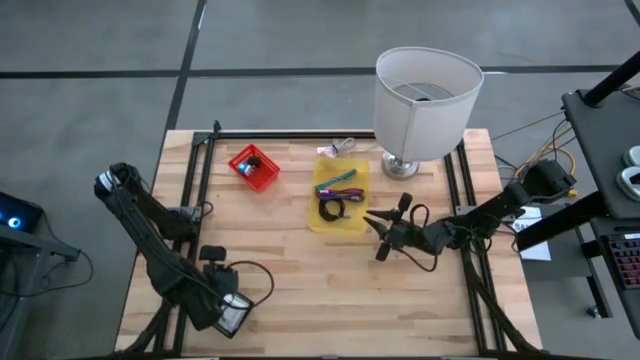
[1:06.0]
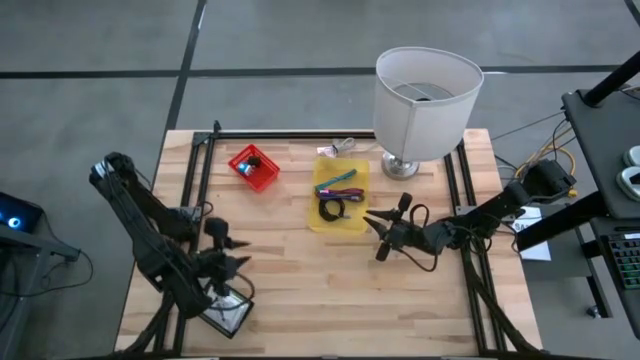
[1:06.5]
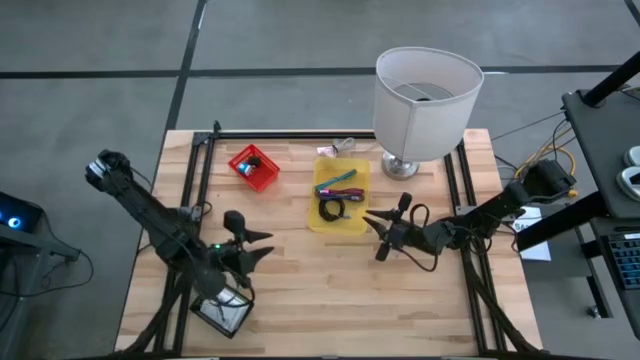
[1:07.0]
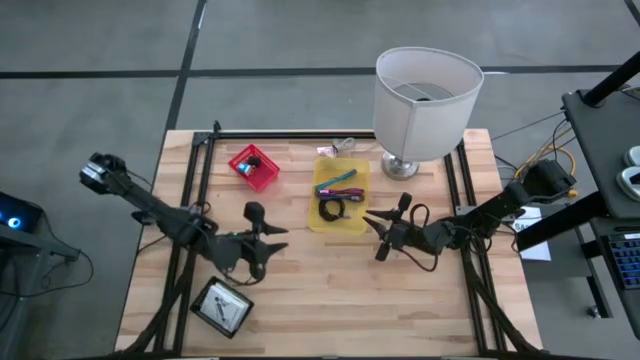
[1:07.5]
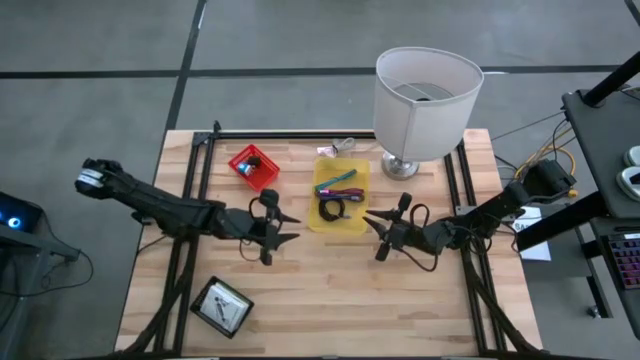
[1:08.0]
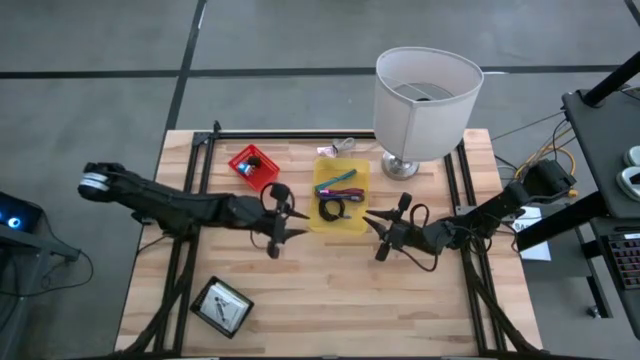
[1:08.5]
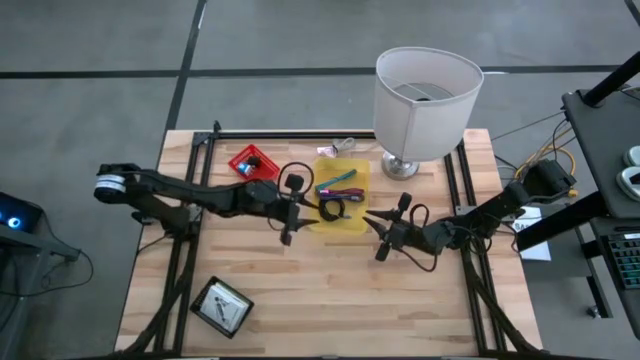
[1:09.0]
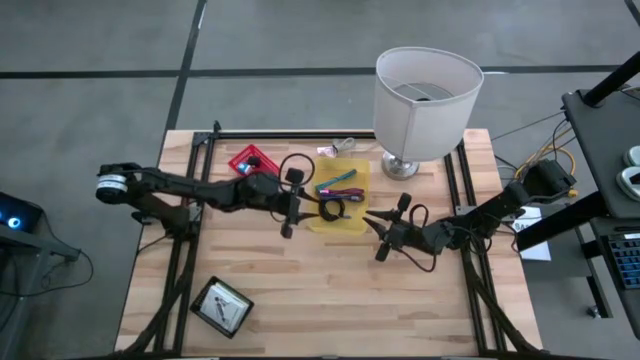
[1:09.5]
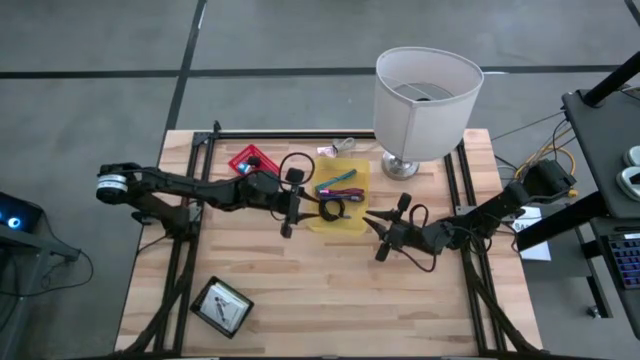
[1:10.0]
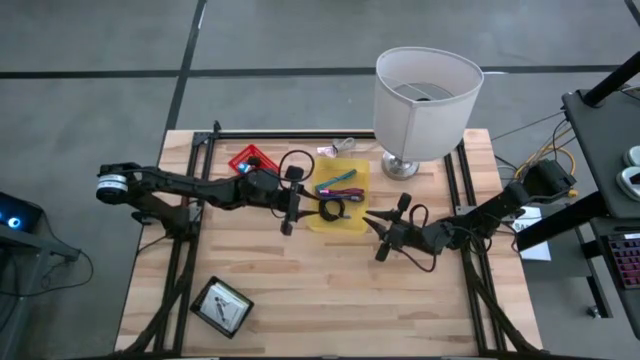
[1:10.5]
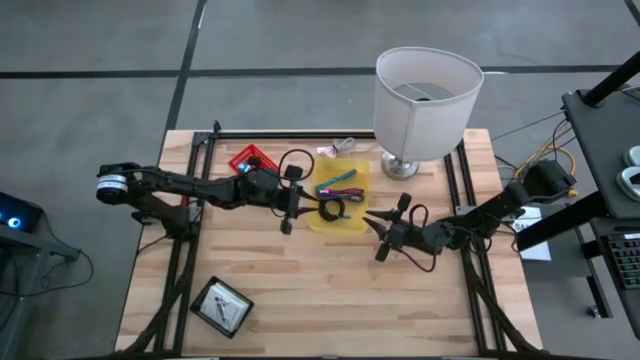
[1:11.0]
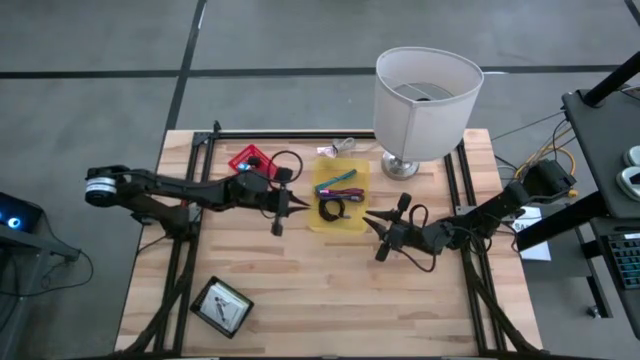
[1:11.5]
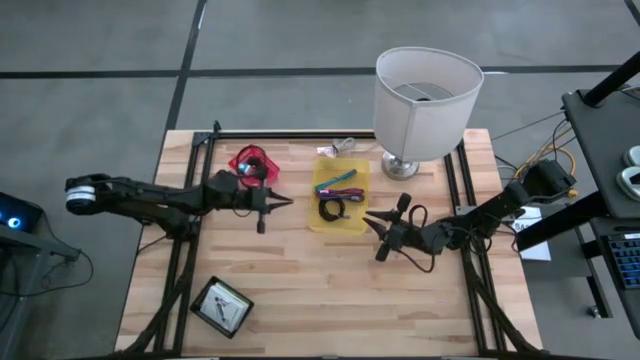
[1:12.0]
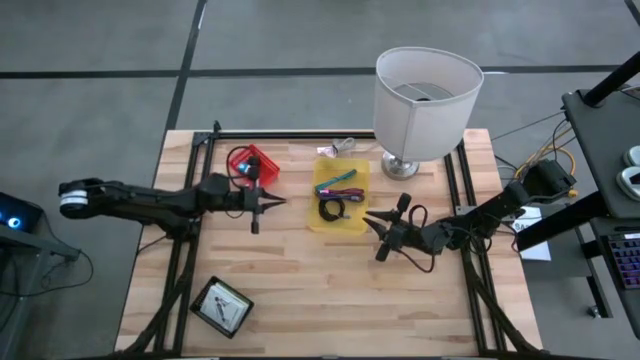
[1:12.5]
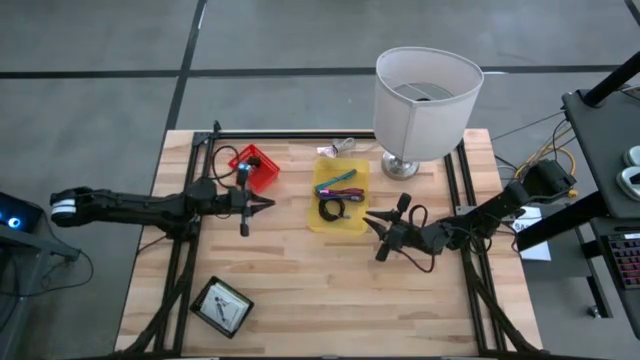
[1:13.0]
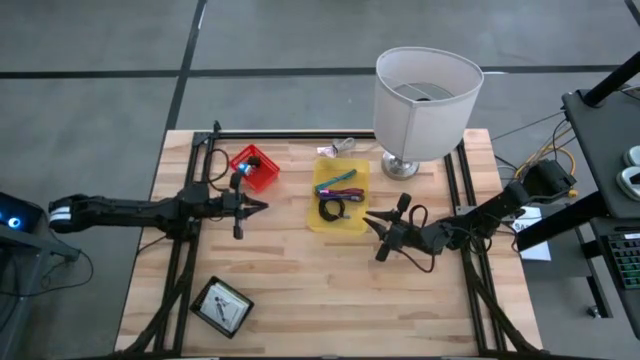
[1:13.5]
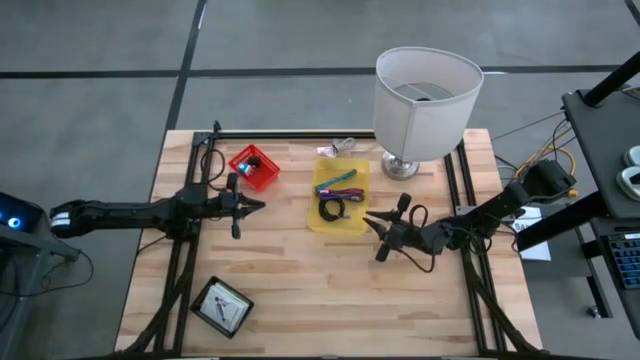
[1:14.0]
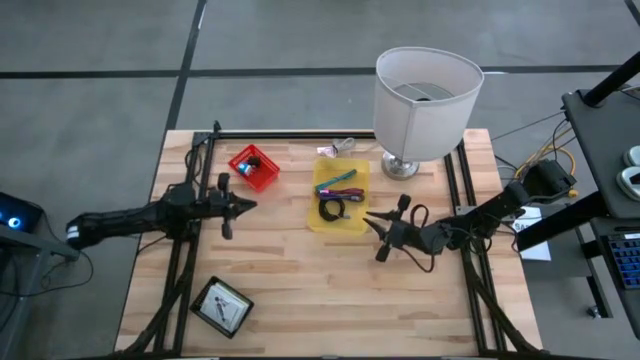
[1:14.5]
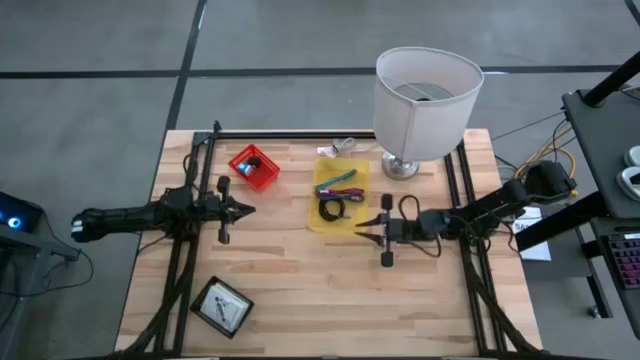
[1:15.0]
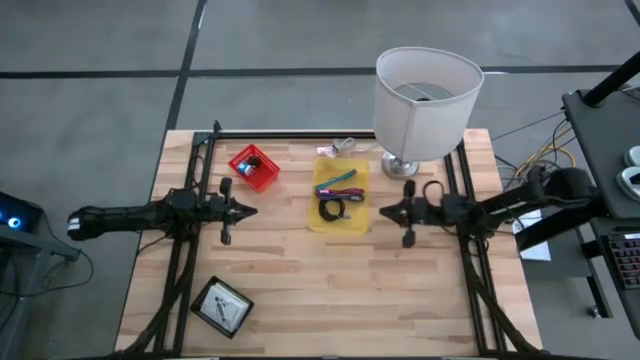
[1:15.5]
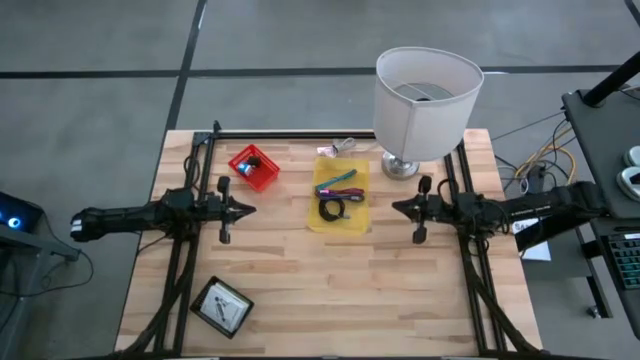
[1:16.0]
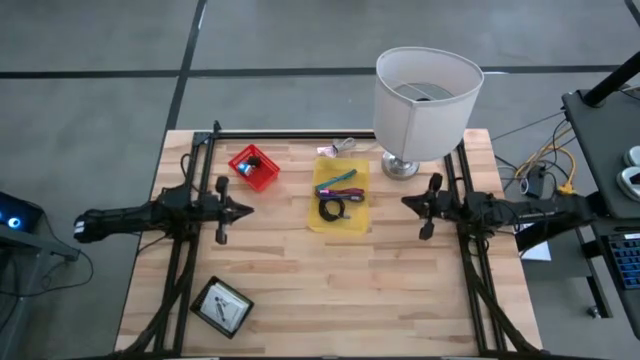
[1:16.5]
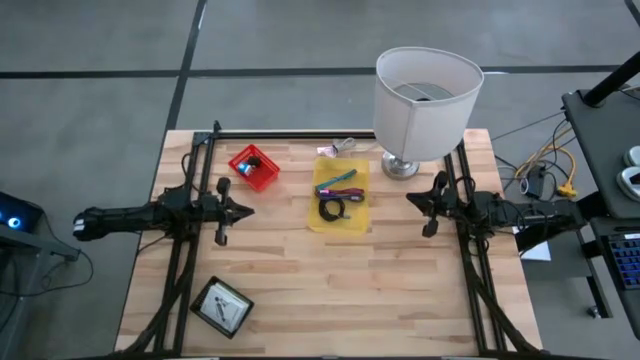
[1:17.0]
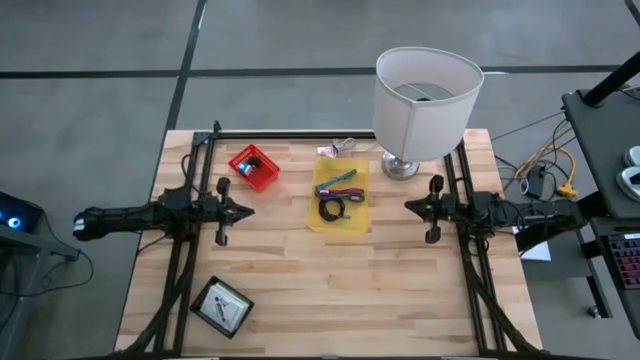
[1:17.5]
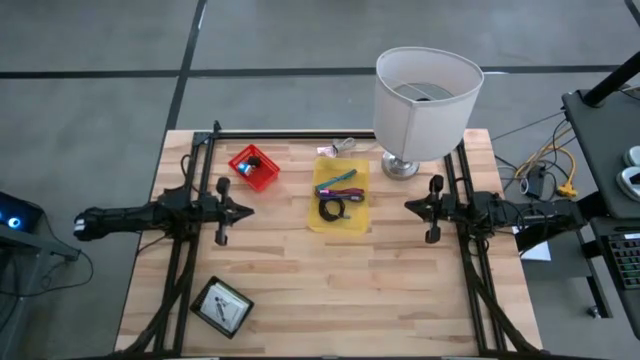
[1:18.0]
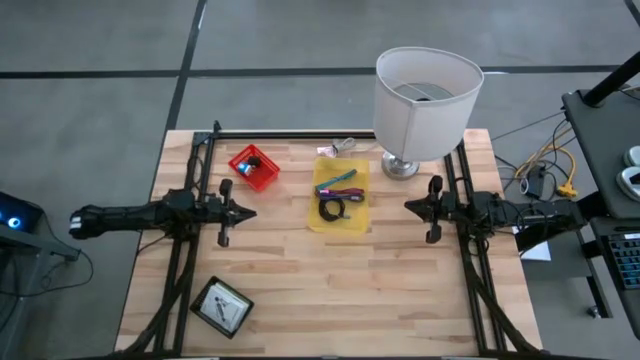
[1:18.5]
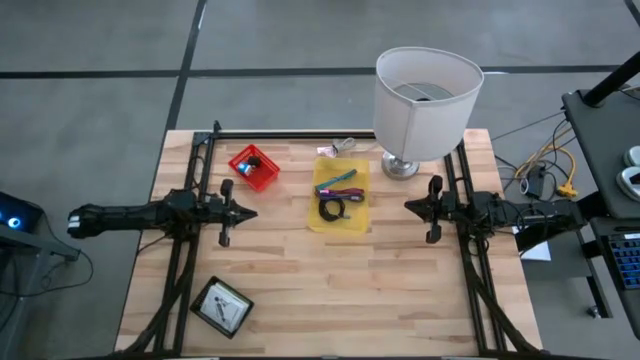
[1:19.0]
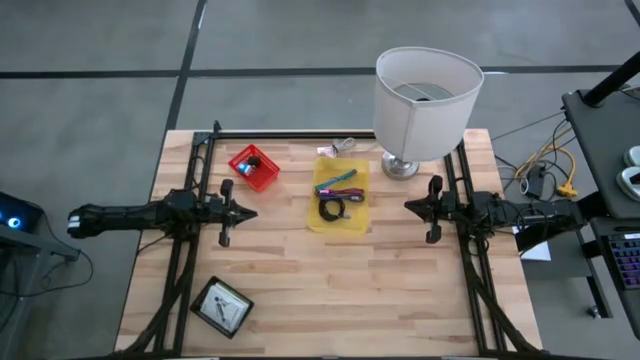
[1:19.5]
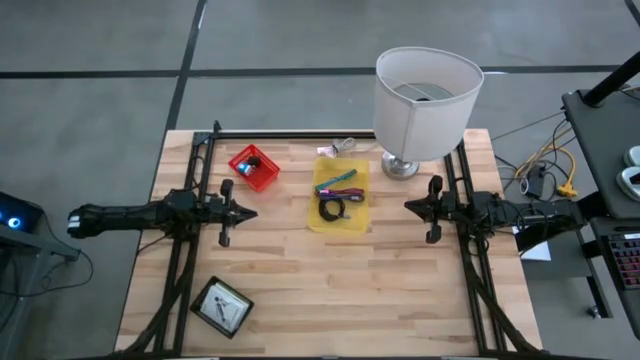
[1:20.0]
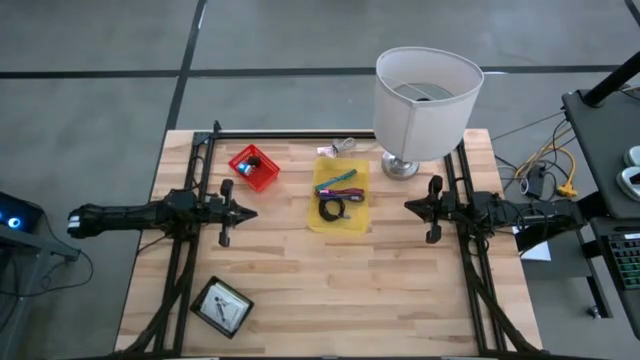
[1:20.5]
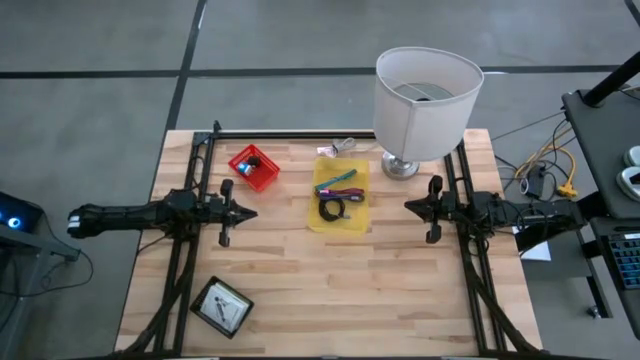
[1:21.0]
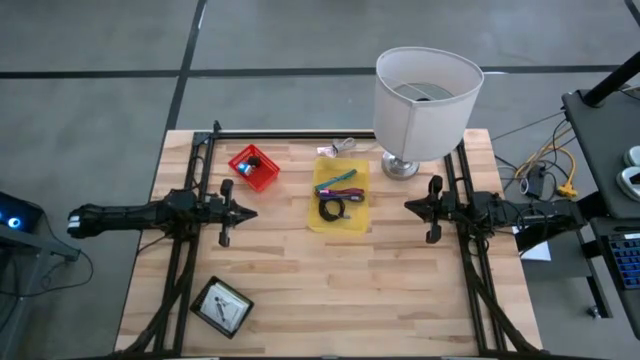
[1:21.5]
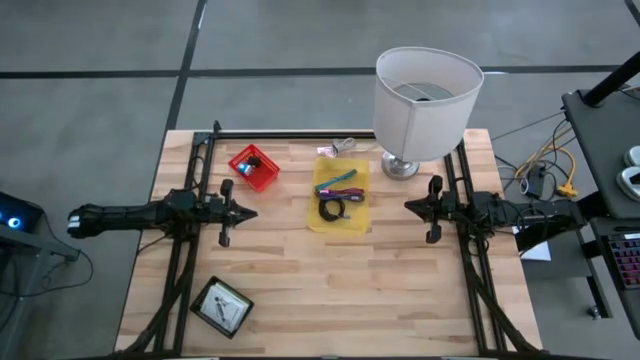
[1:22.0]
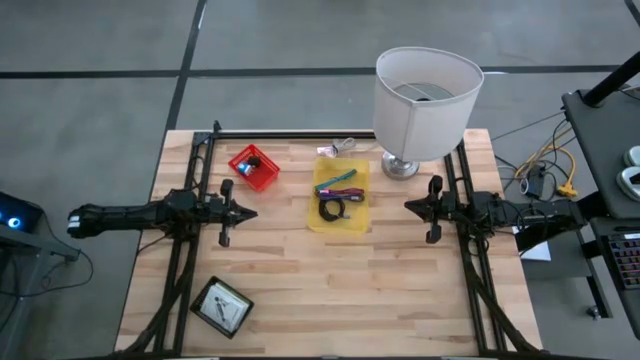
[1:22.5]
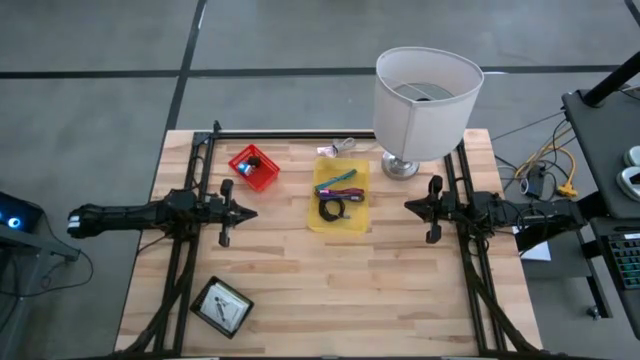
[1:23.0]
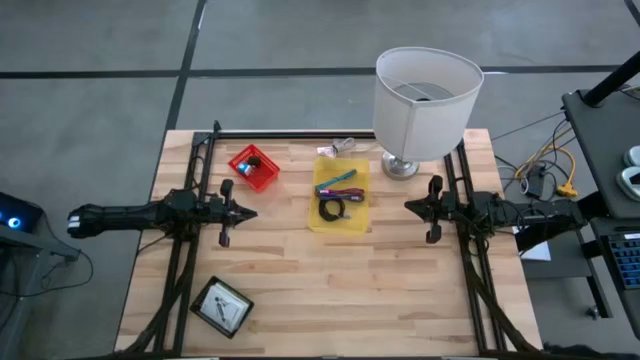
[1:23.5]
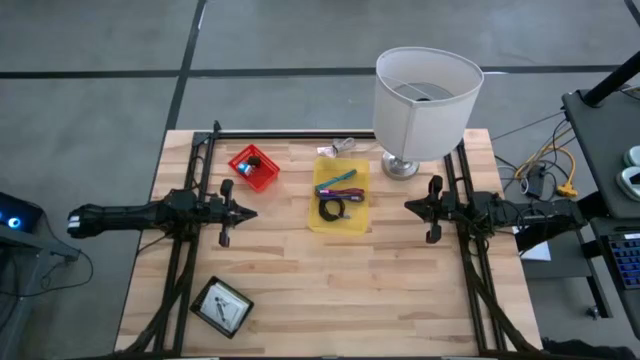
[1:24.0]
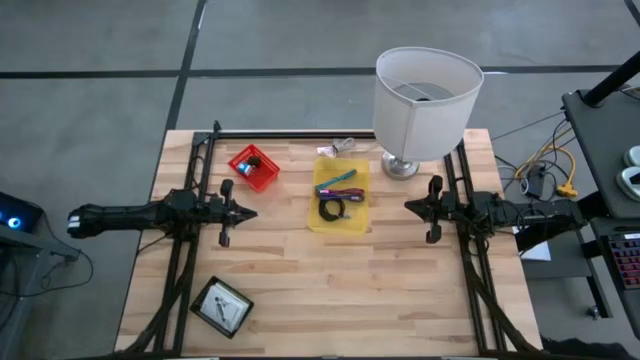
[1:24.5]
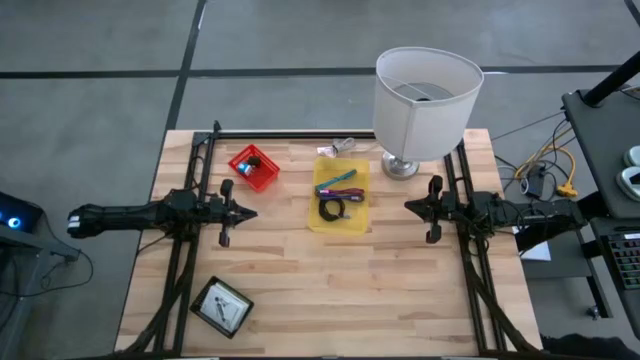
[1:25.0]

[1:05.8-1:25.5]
Task: Pick and place items into bin
Return to Home Position

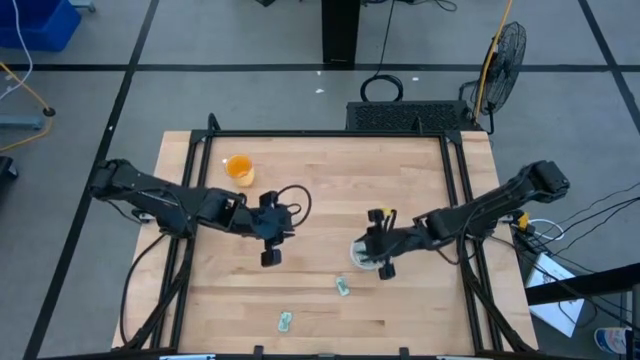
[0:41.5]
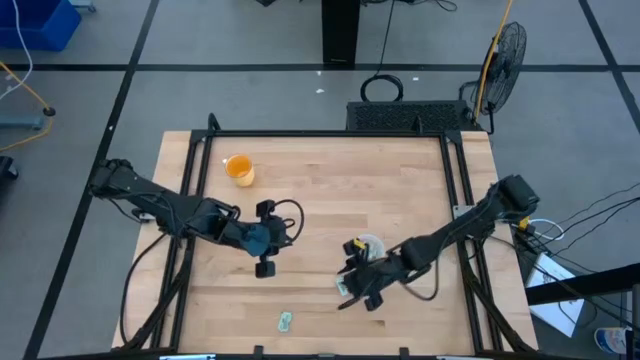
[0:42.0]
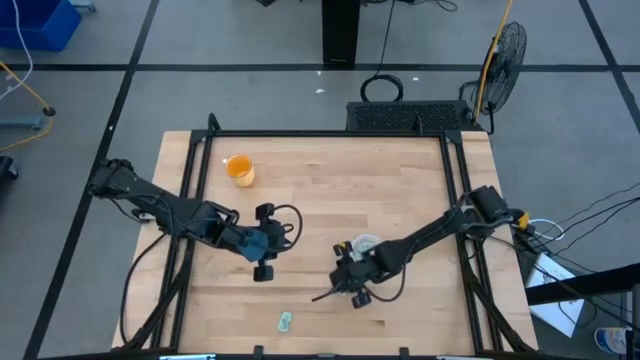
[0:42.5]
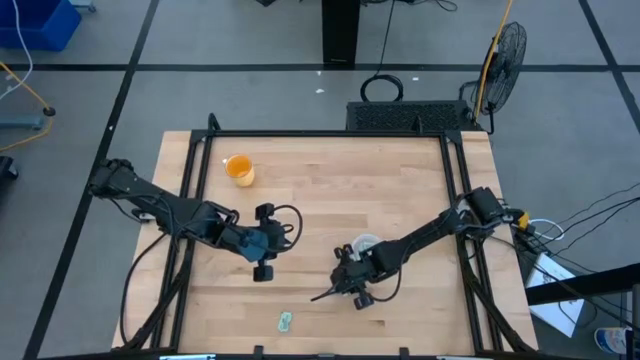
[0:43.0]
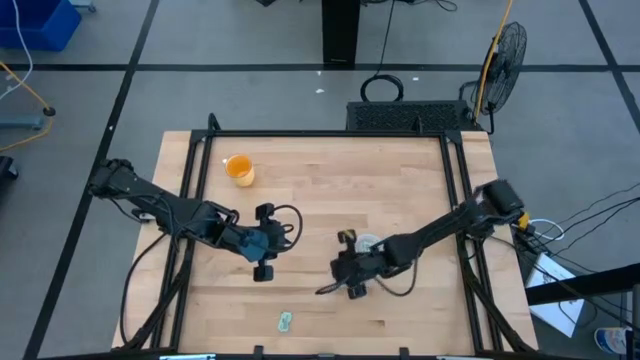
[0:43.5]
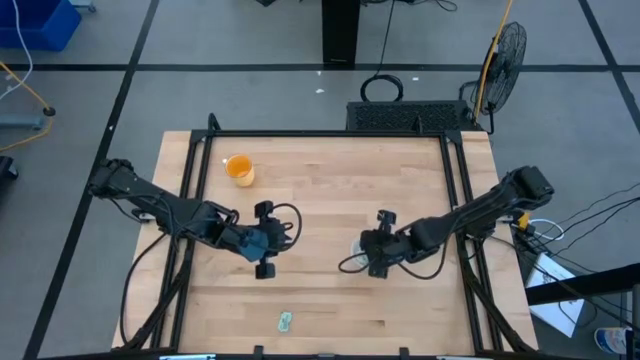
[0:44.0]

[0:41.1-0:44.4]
Task: Pick and place Stevia / Truvia into bins
Put the stevia packet into the transparent container
